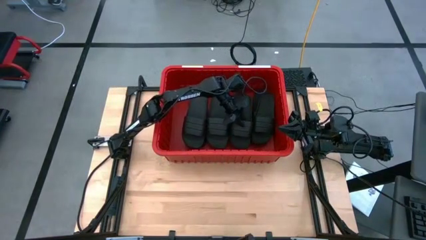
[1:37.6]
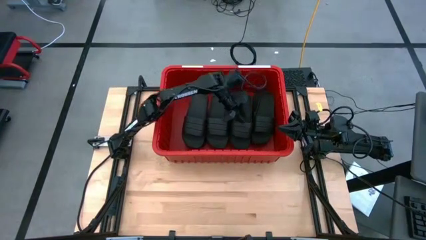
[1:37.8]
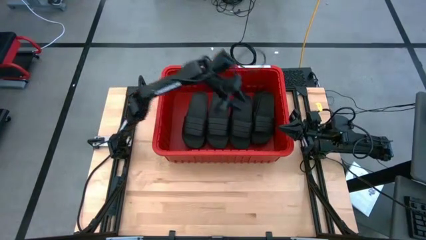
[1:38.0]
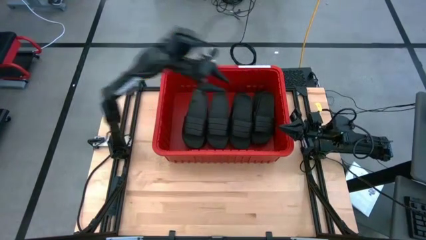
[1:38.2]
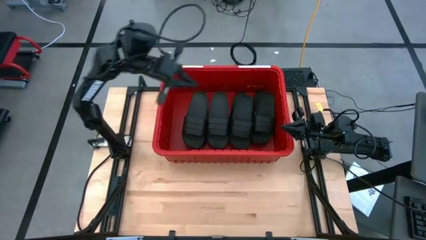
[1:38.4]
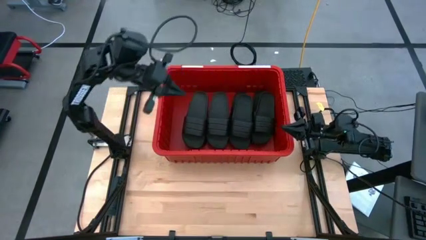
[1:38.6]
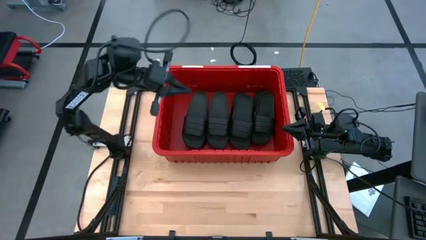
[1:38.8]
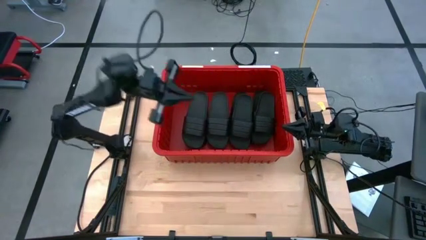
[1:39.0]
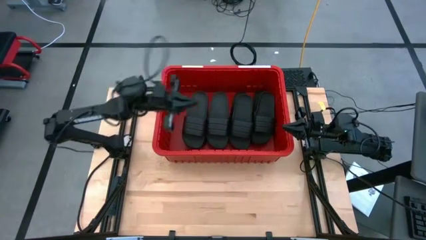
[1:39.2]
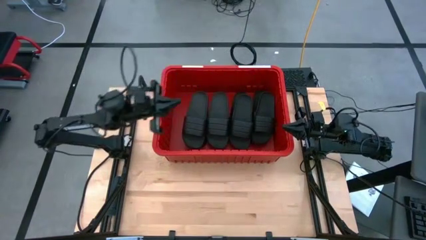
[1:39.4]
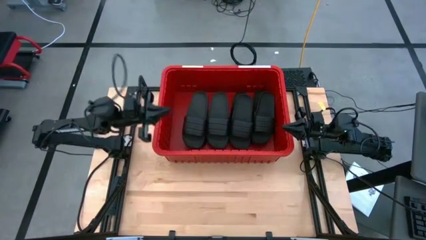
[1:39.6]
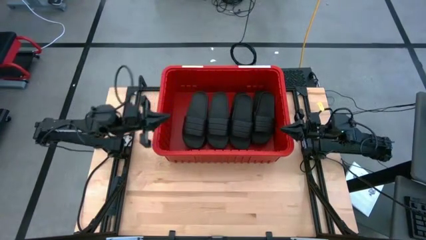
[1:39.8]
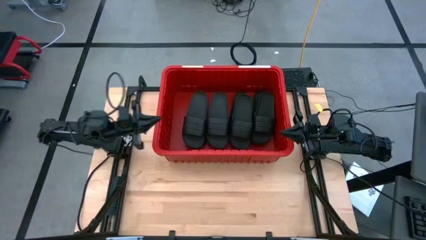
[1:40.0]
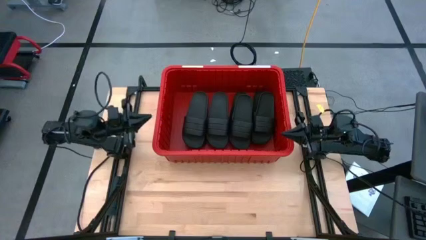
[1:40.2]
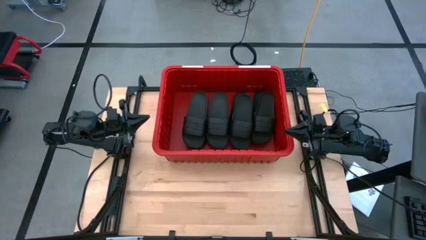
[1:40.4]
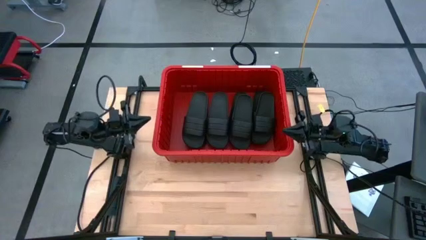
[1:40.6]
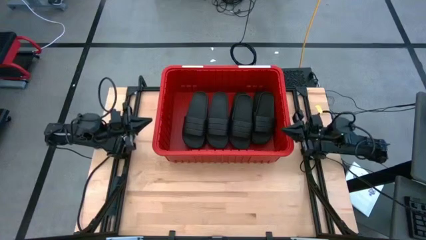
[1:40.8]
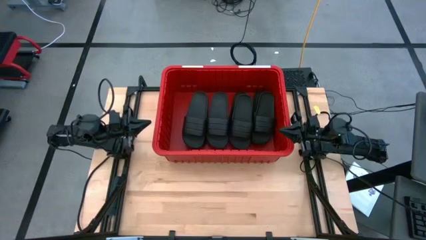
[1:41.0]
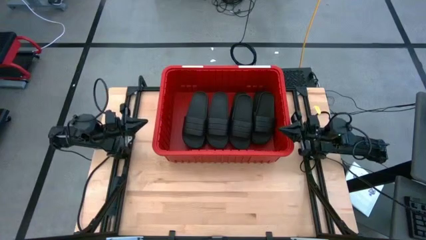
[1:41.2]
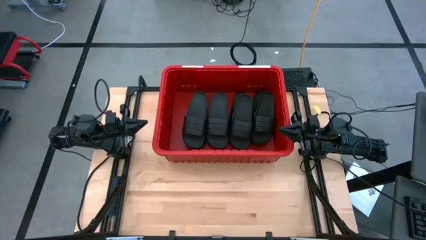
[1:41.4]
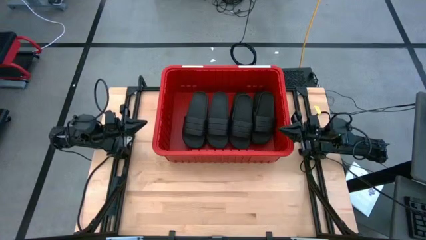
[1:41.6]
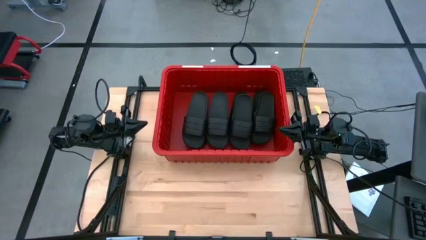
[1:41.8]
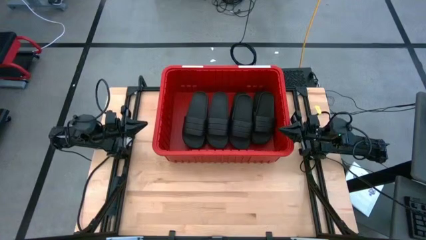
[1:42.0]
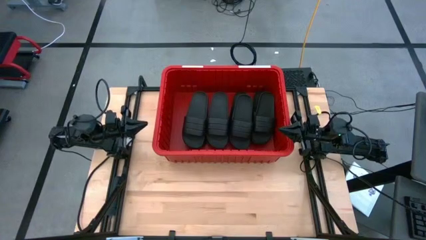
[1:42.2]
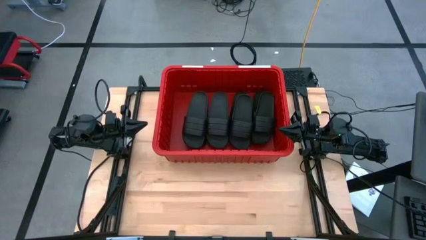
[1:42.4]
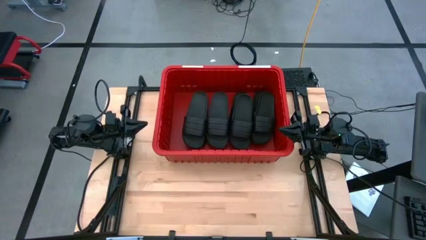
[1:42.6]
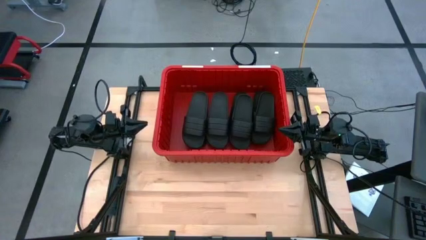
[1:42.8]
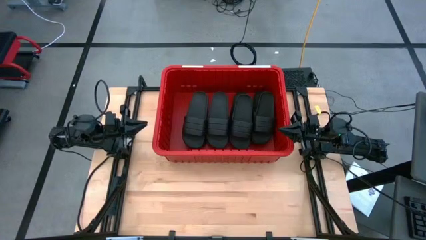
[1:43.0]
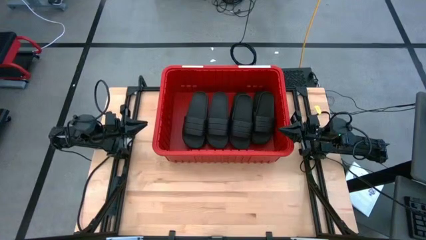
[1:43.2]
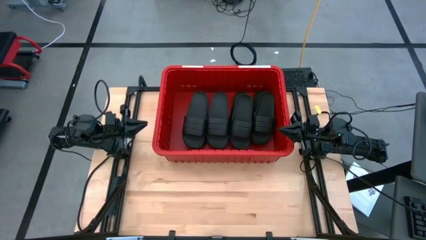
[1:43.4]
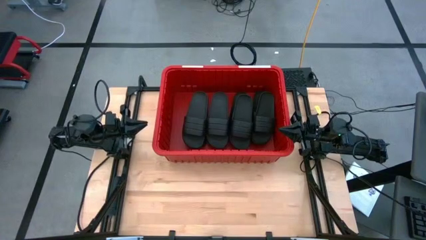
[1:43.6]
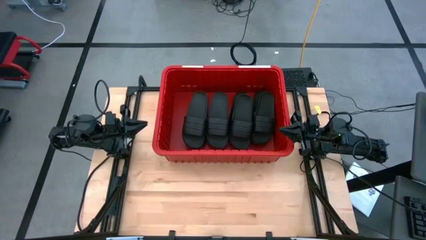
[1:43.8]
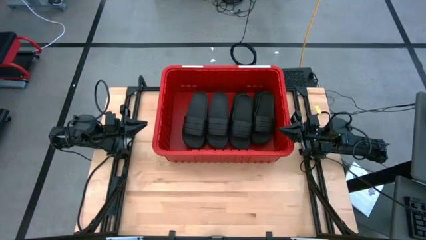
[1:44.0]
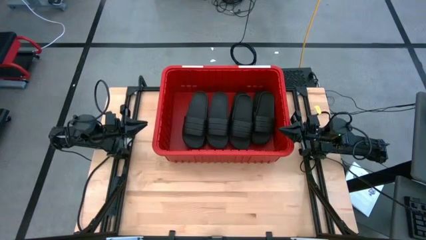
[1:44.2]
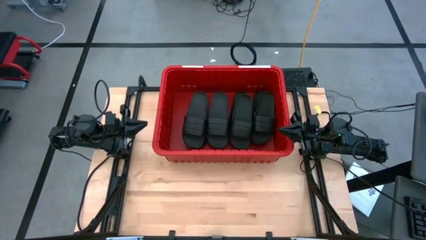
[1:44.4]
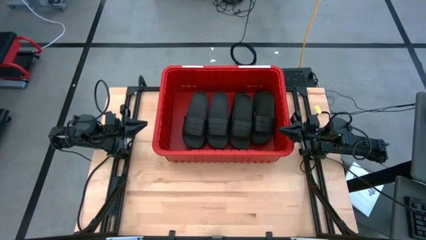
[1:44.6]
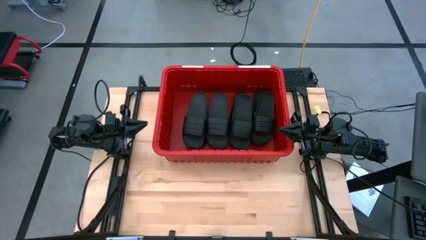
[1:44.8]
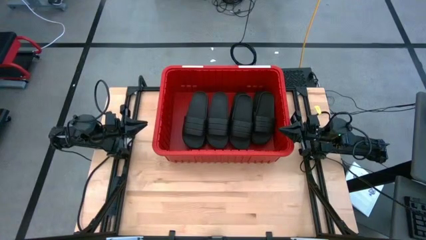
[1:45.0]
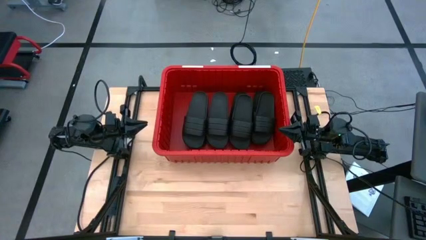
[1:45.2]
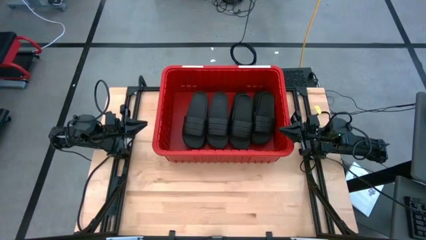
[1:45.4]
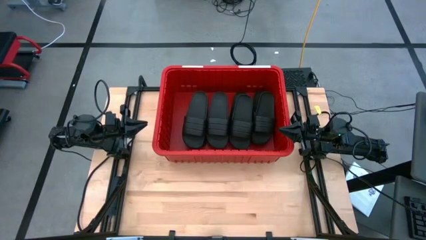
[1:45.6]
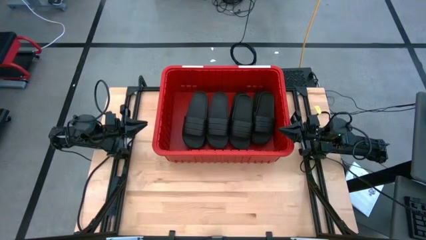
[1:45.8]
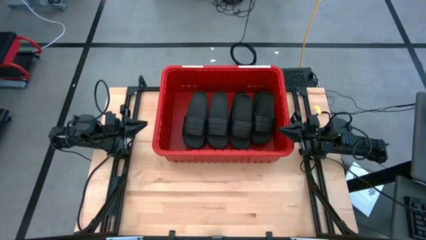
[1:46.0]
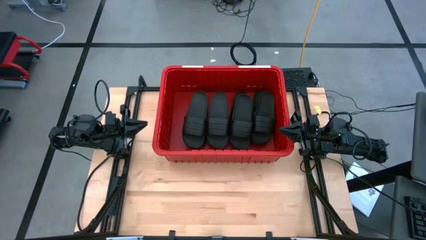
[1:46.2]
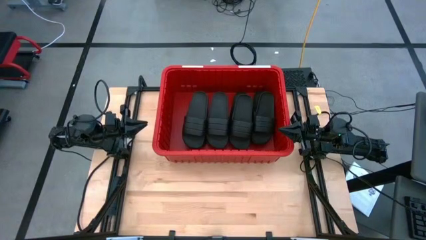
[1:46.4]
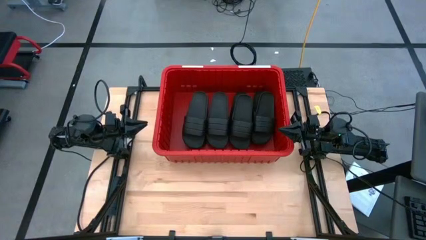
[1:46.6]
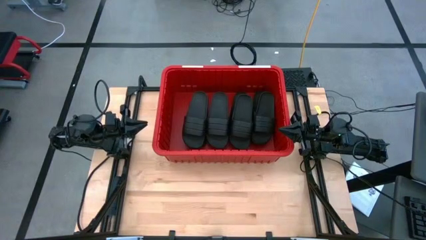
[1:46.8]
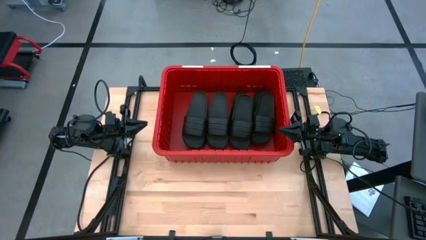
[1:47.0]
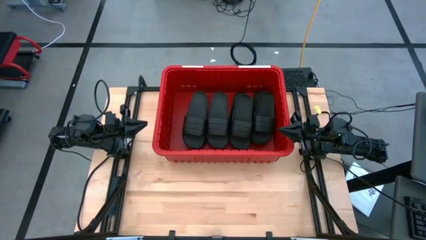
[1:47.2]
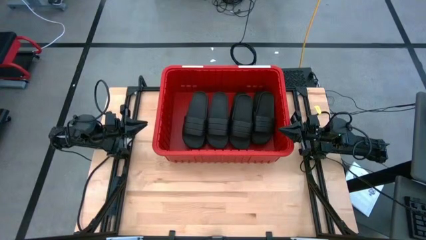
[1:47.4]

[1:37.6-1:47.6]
Task: Pick and place slides into bin
Return to Home Position
